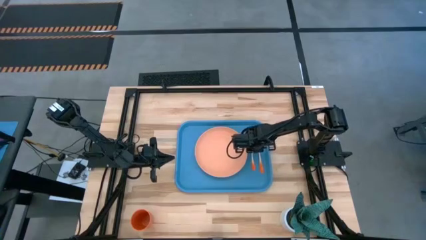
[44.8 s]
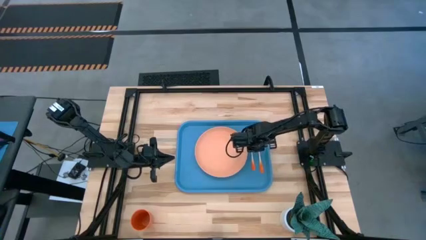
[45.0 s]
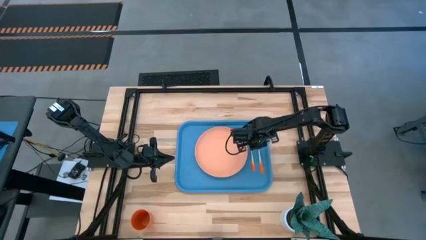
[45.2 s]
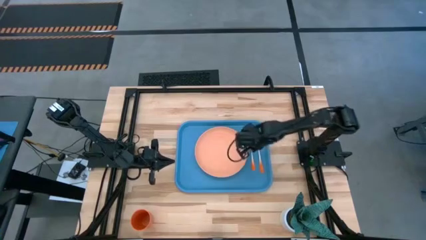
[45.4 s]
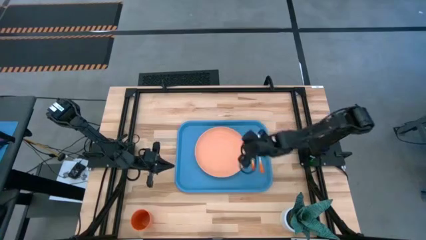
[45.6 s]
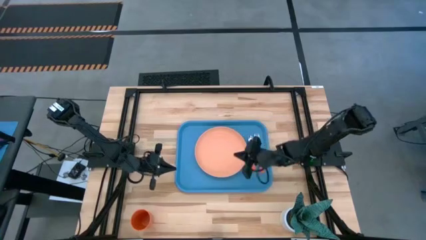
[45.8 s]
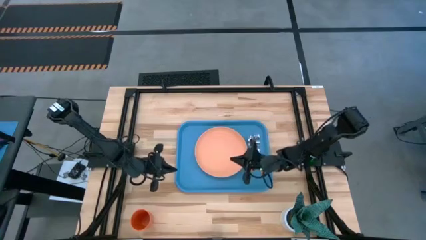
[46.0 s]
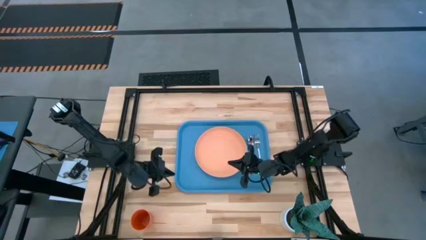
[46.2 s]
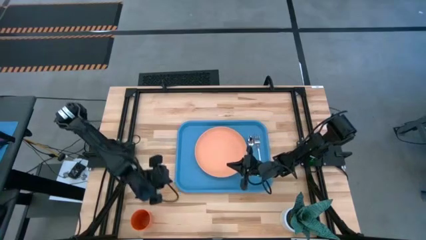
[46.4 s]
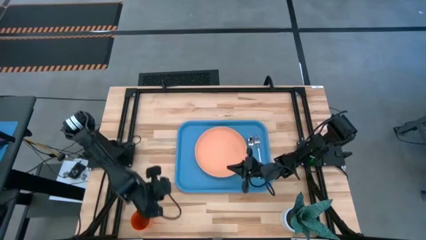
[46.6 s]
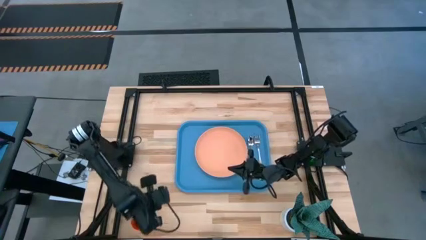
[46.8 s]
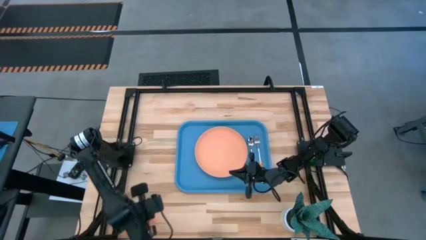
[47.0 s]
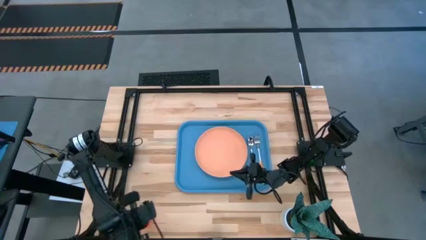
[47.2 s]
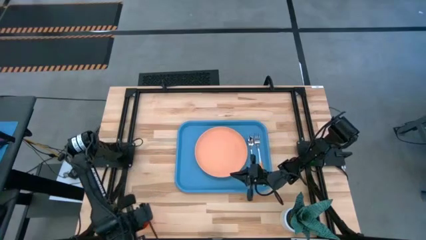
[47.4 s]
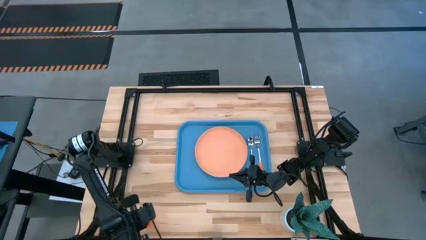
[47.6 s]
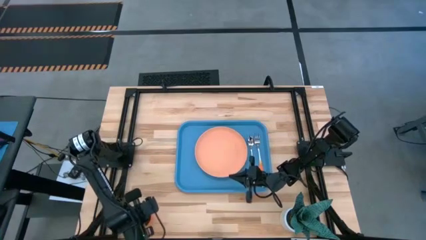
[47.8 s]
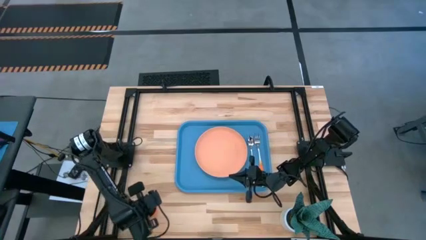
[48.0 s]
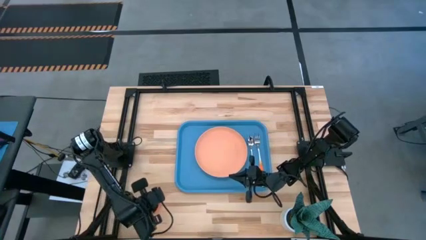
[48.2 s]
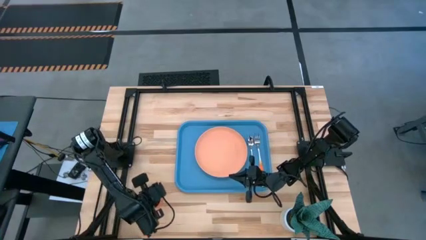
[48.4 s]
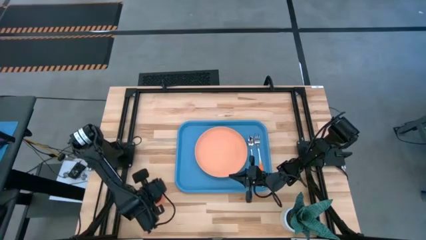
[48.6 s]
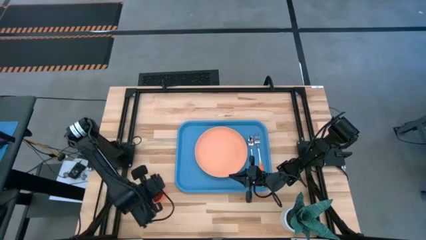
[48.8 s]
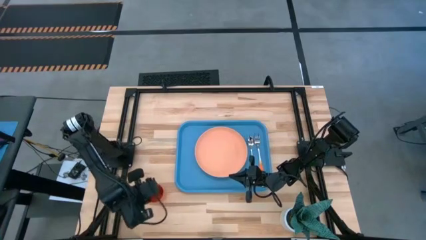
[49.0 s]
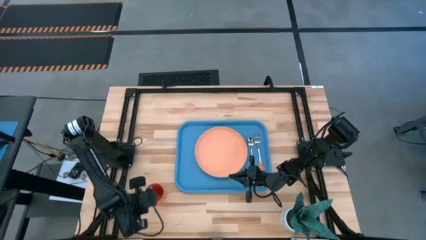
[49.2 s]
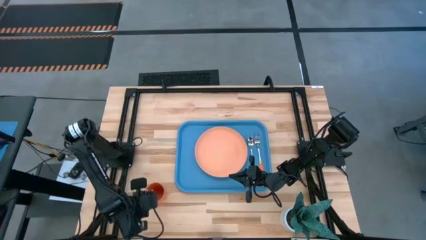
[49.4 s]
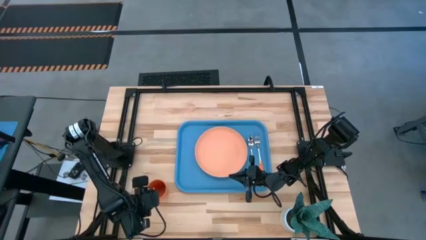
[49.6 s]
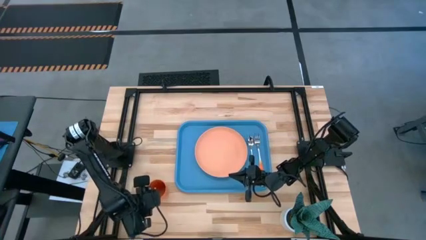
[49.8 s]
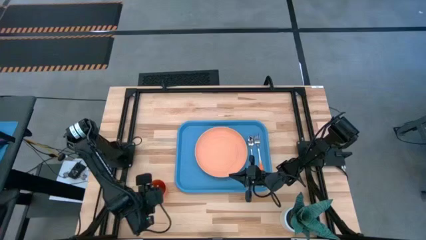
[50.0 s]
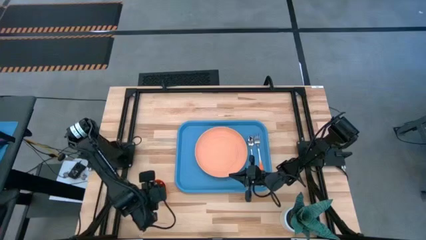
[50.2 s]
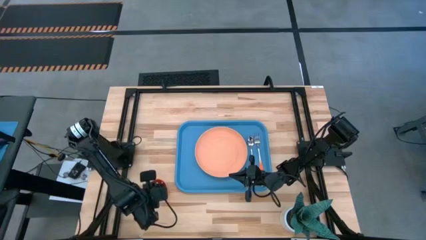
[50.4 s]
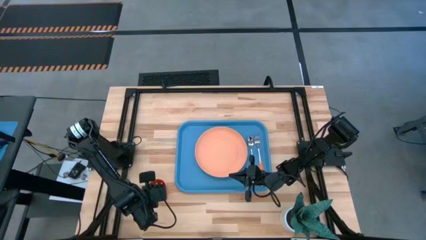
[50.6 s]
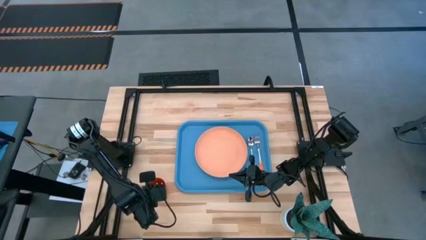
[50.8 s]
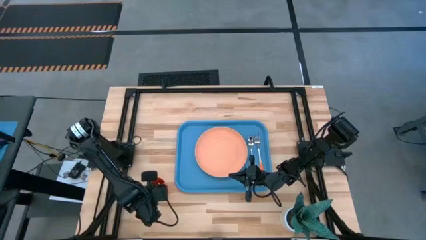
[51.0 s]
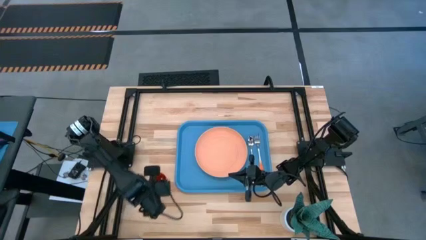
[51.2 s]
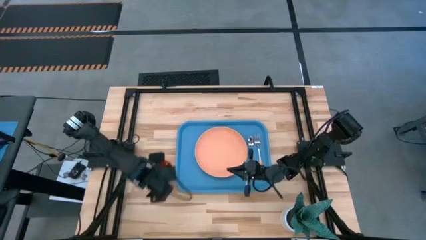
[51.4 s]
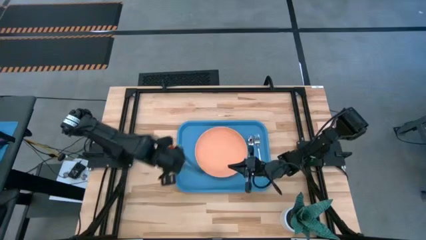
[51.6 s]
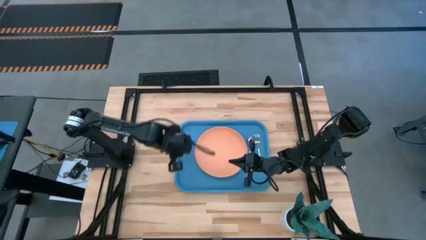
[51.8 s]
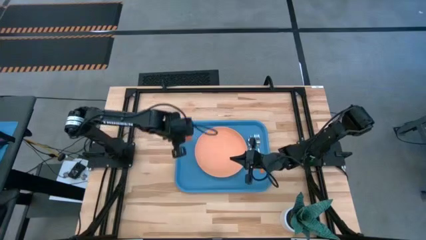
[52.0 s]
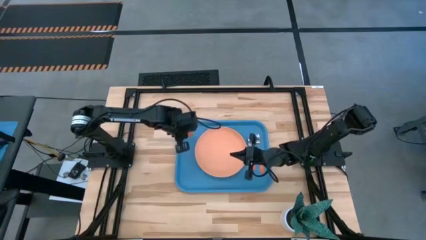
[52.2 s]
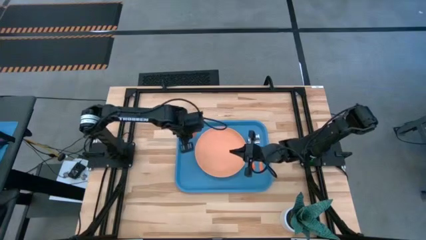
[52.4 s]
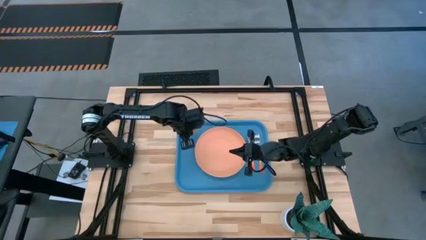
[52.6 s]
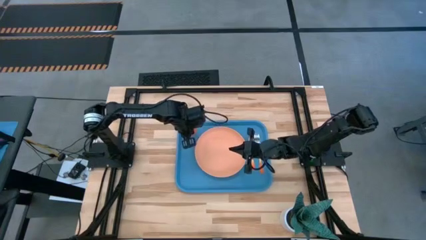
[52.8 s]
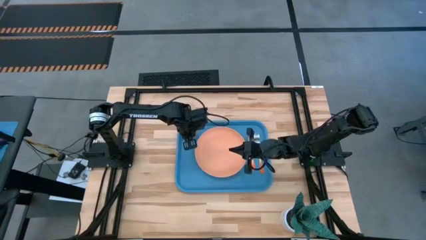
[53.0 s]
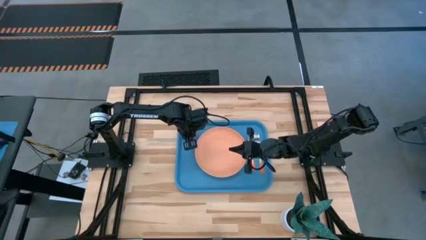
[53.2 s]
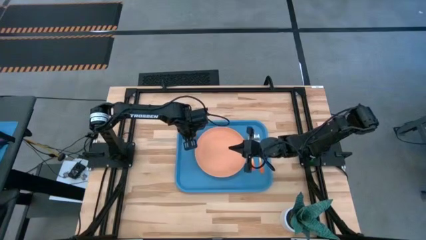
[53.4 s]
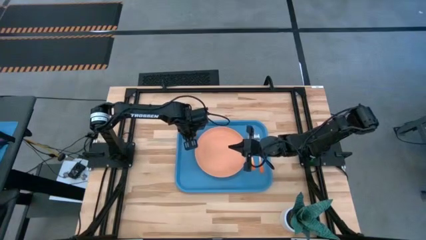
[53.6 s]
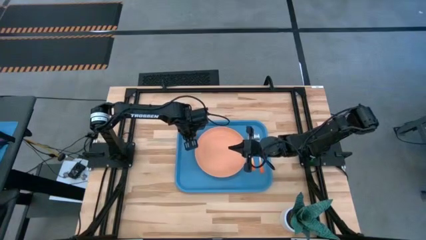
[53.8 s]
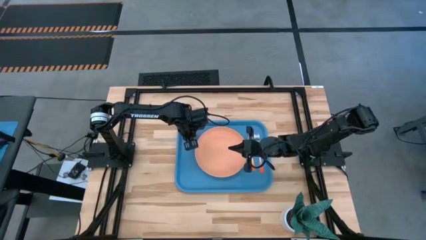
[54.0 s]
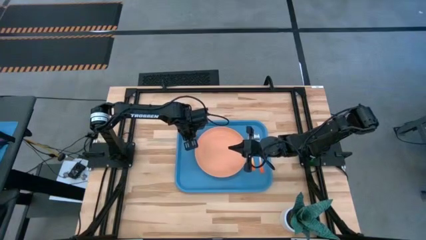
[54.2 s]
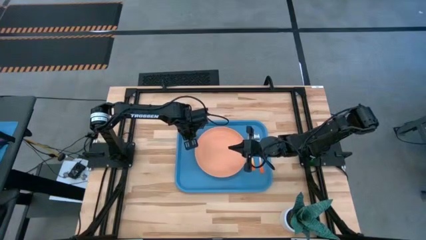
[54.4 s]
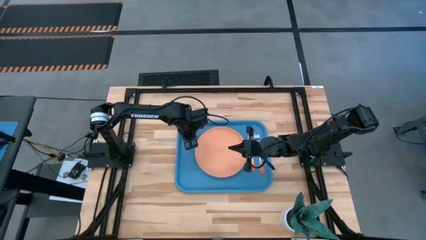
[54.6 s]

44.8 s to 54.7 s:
Task: Pick and place plate/cup/fork/spoon on tray
Put the orange cup on the blue serving tray to the top left of the light orange plate

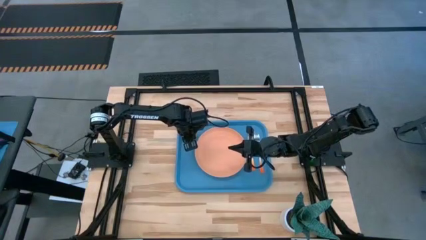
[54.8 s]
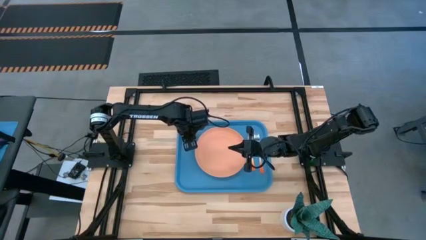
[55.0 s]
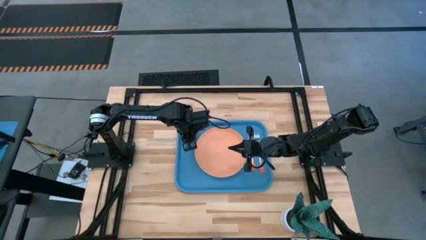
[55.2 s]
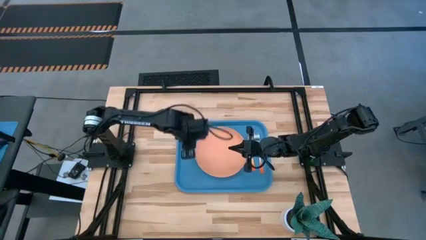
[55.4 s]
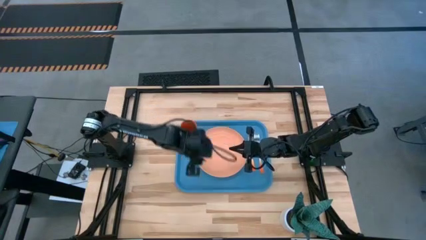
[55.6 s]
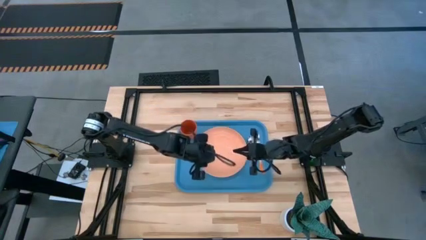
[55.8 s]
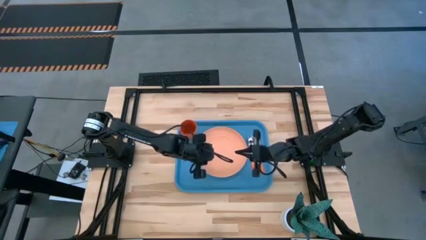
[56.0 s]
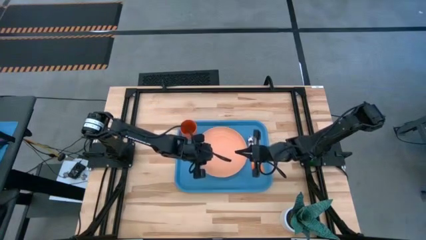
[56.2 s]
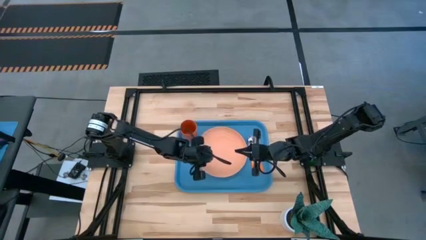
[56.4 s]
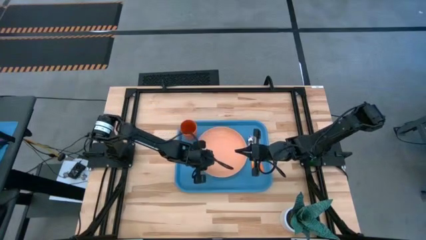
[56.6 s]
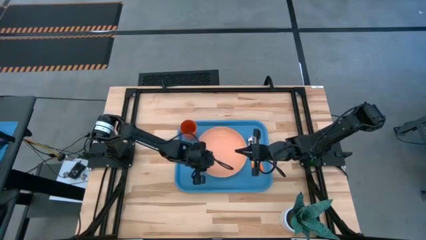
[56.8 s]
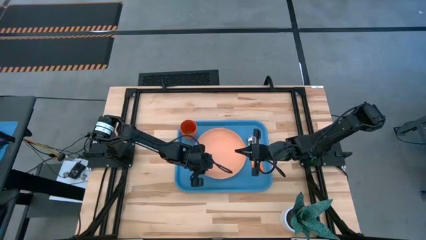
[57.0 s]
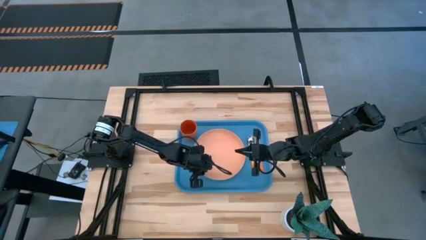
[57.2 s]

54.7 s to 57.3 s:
Adjust the light orange plate on the blue serving tray

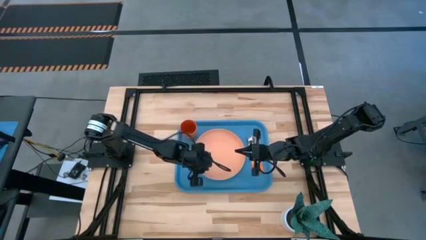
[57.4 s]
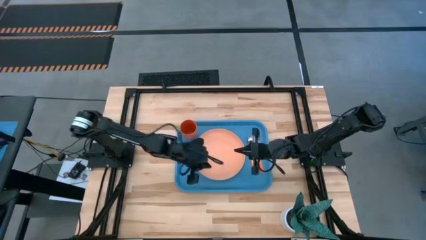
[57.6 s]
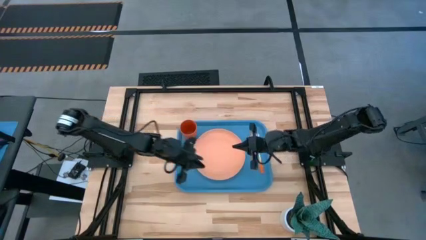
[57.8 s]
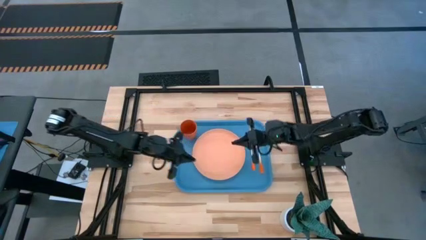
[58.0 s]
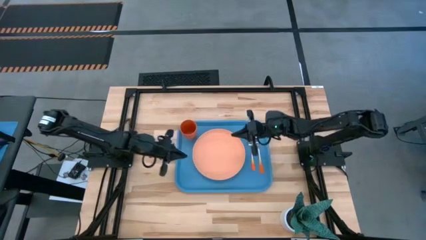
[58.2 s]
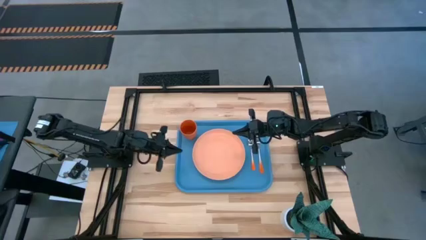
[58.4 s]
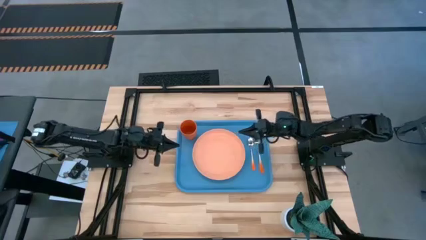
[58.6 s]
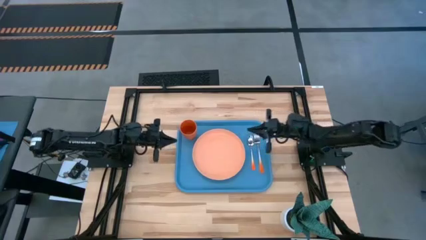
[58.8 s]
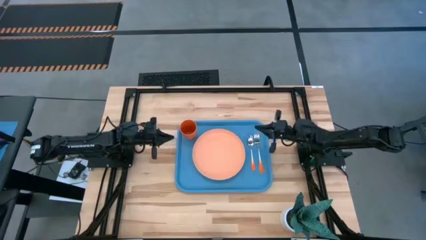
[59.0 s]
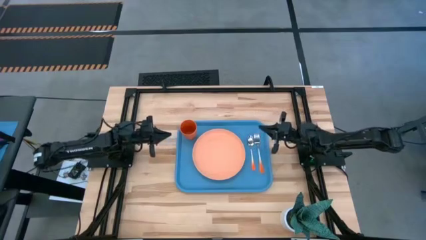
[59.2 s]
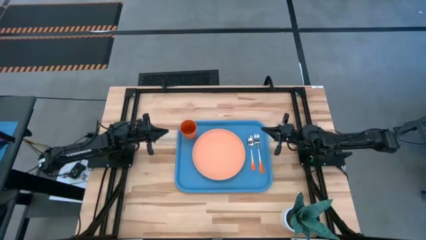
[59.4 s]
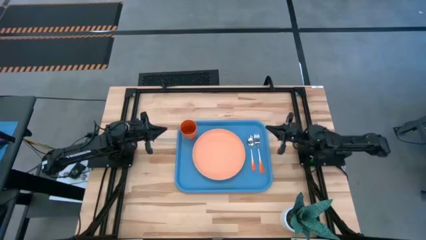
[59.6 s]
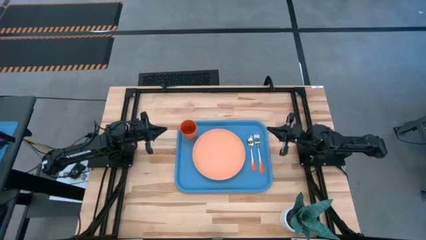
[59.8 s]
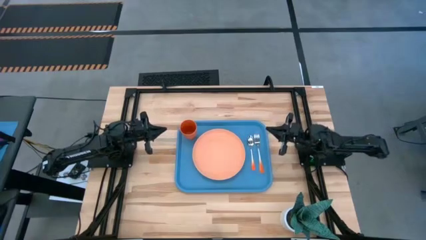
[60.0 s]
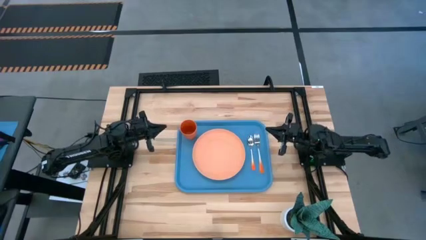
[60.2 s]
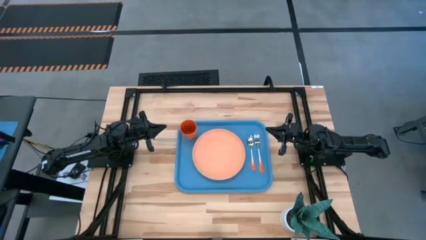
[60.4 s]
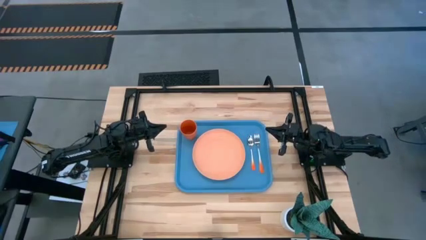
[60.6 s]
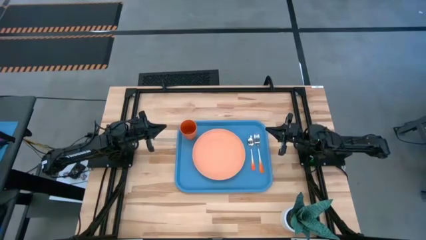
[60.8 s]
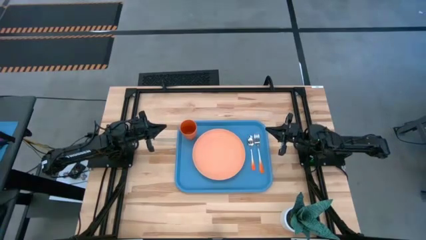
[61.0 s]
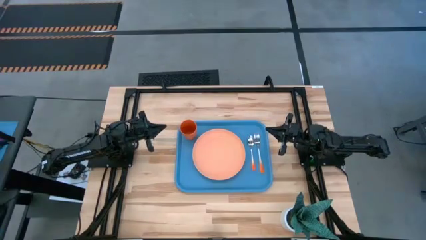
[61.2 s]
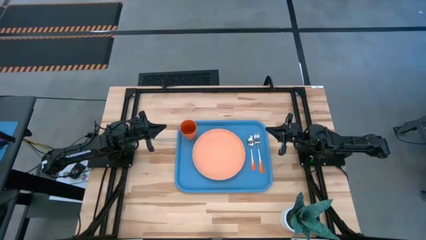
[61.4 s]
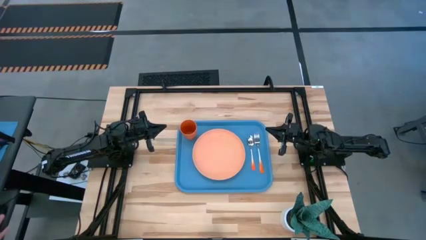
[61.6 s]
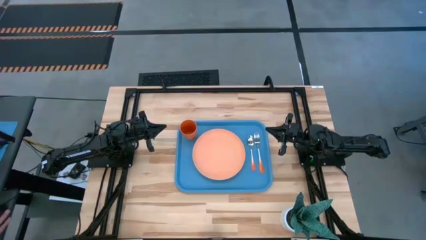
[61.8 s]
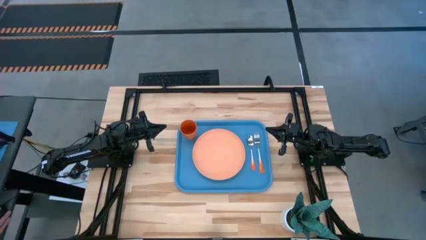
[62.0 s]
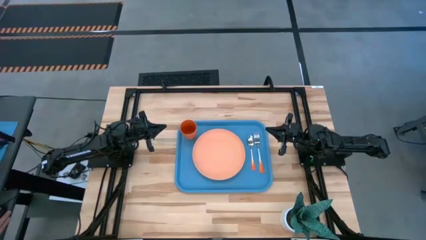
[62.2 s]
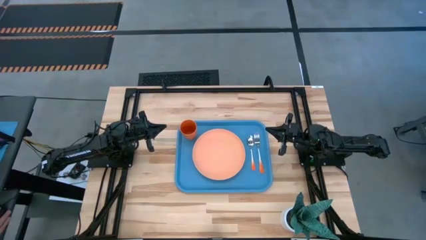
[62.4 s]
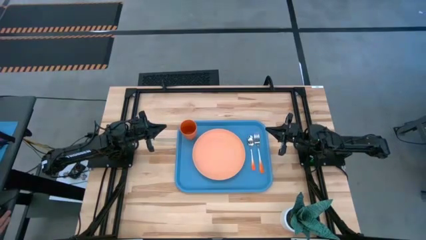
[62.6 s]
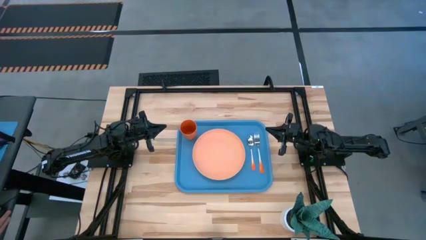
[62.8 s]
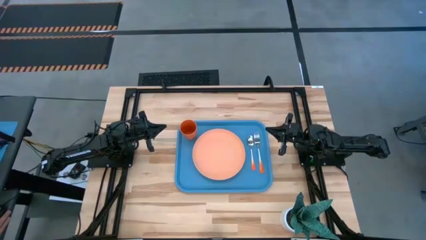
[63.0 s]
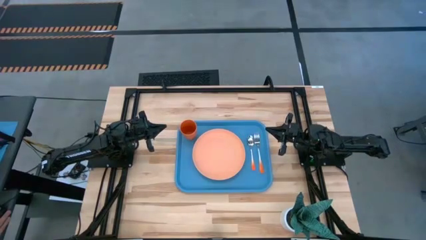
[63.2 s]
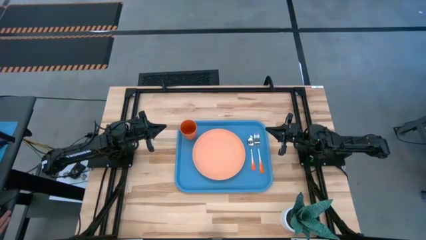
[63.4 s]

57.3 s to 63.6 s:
Return to Home Position
